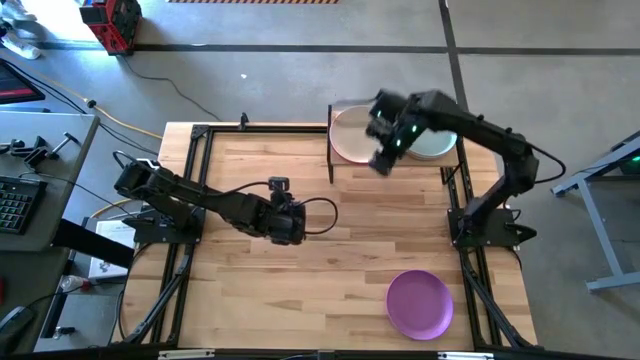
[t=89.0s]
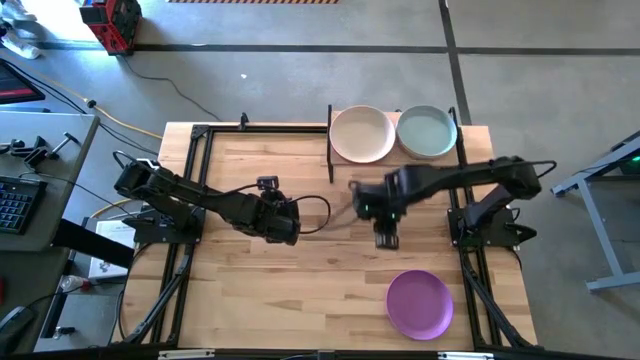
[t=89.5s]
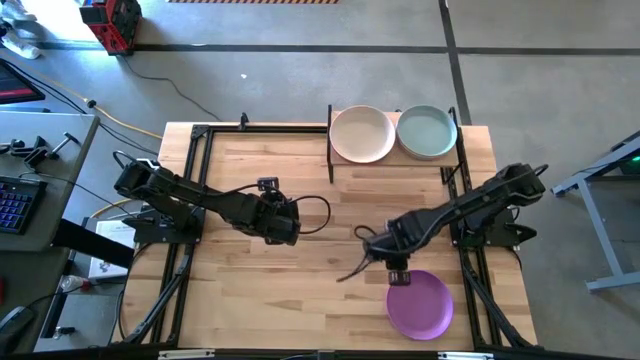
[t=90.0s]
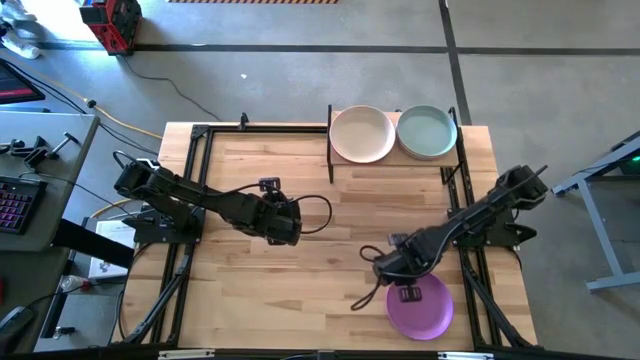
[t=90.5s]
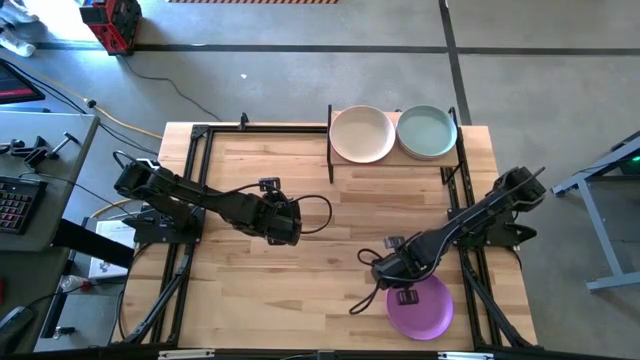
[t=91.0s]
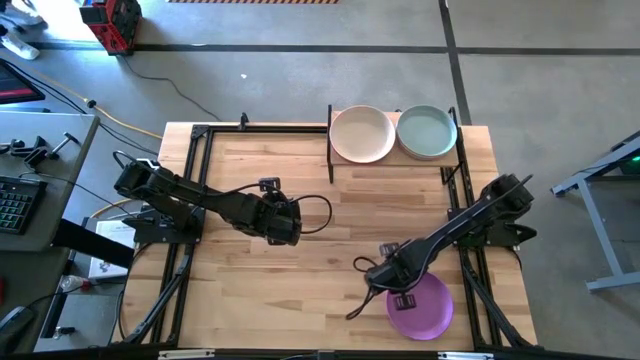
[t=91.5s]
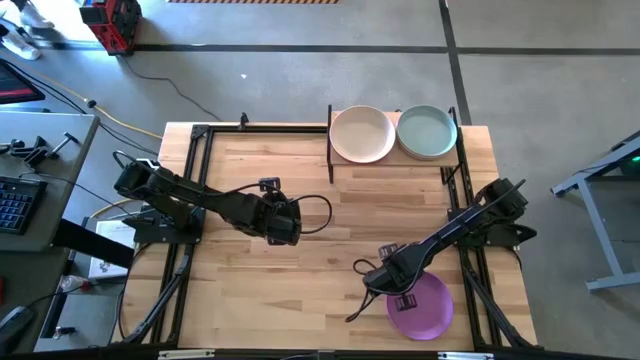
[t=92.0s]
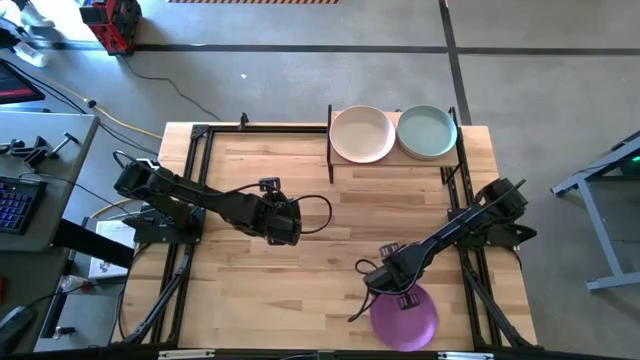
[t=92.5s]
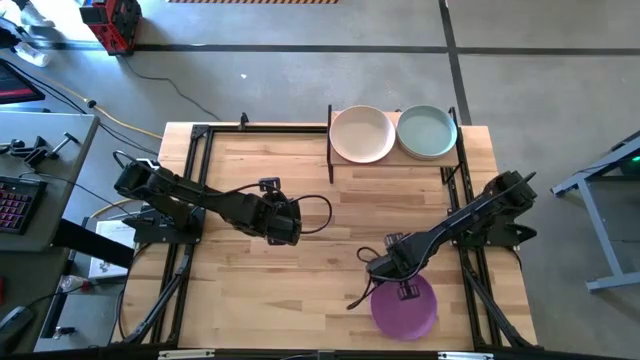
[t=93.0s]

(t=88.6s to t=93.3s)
Task: Place and stack plates onto a shelf
Stack the violet plate into the white plate on the shelf

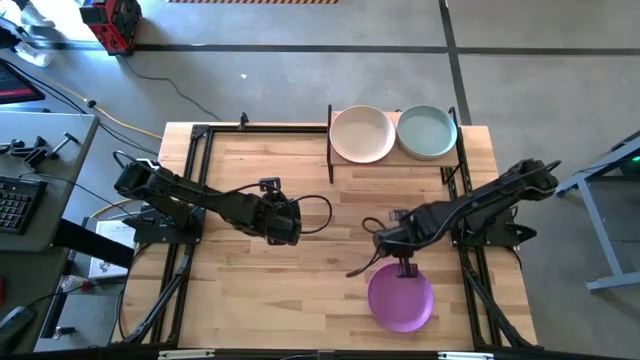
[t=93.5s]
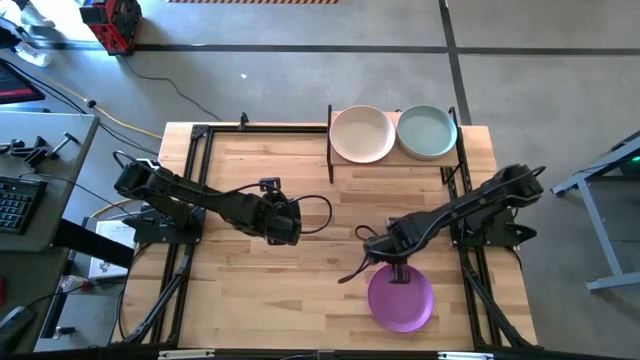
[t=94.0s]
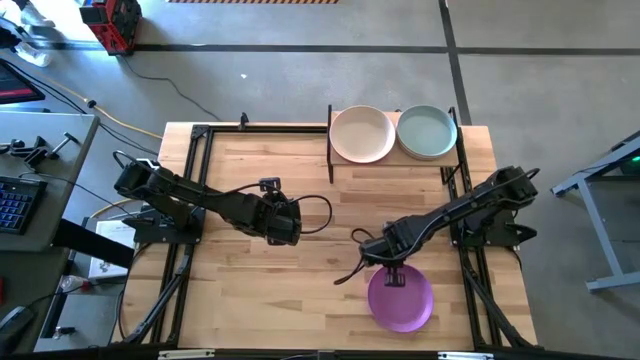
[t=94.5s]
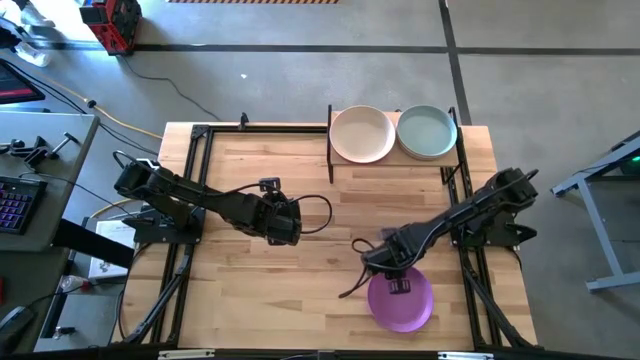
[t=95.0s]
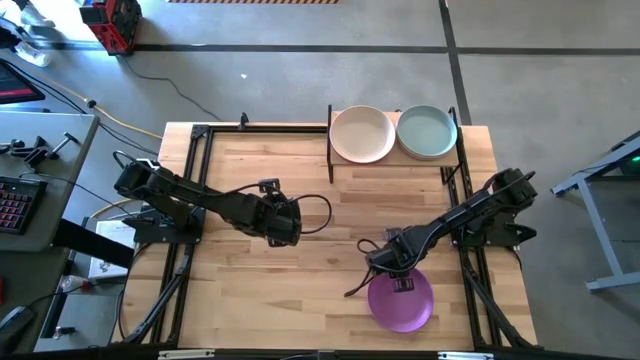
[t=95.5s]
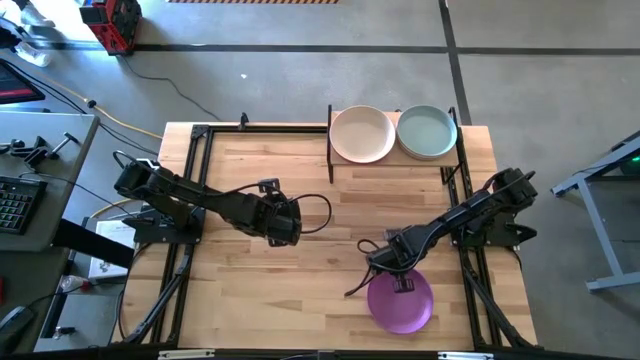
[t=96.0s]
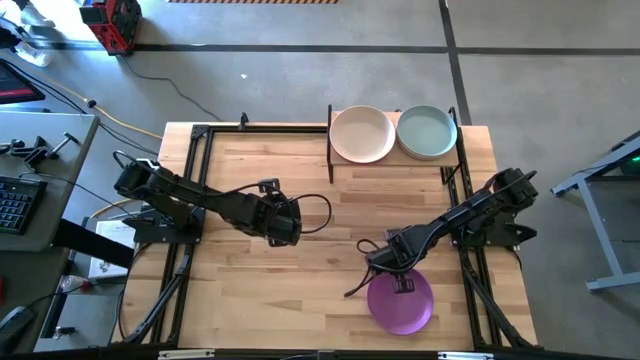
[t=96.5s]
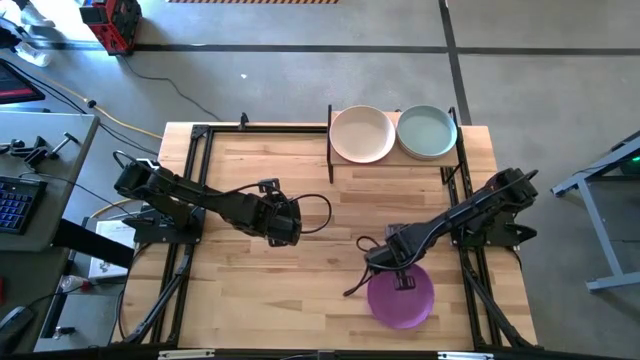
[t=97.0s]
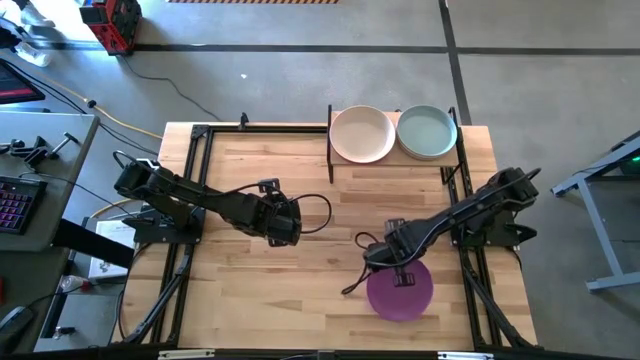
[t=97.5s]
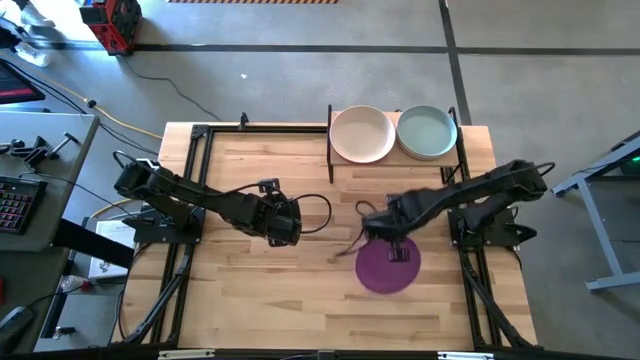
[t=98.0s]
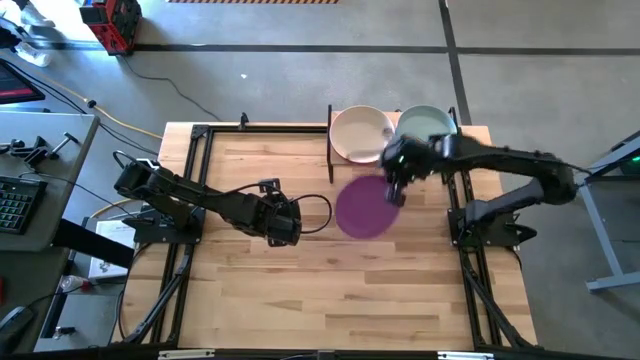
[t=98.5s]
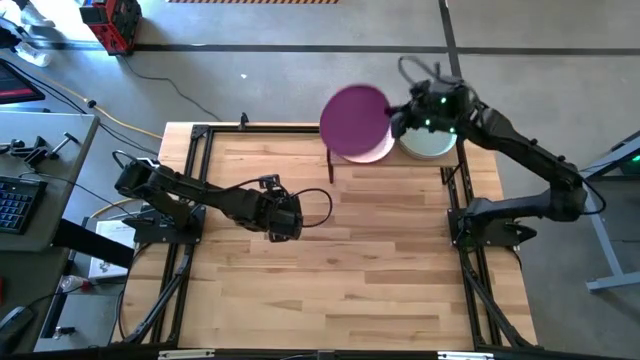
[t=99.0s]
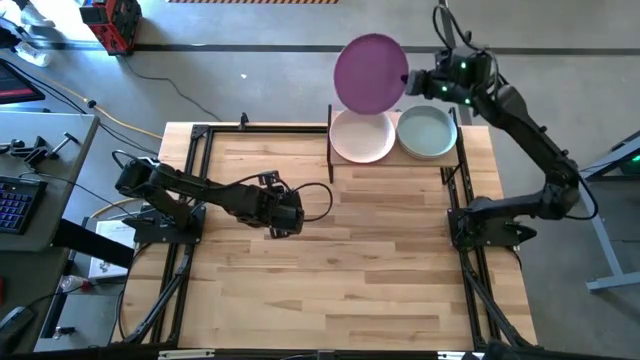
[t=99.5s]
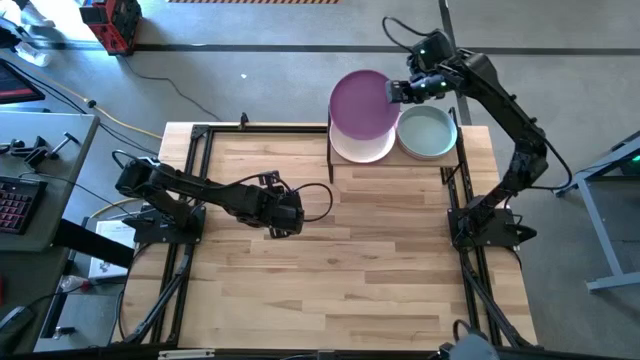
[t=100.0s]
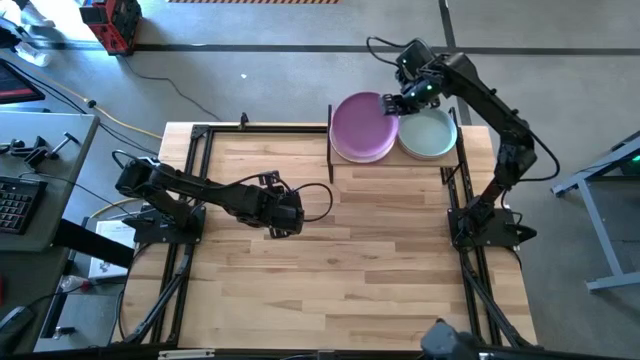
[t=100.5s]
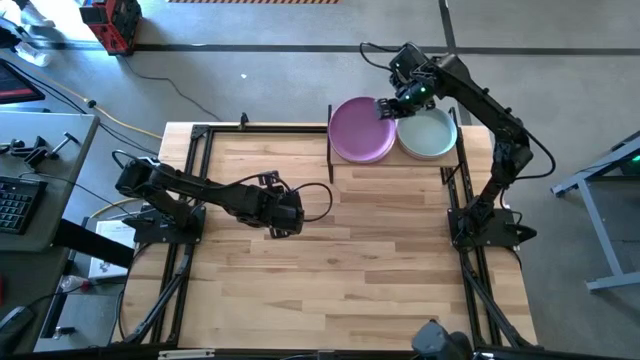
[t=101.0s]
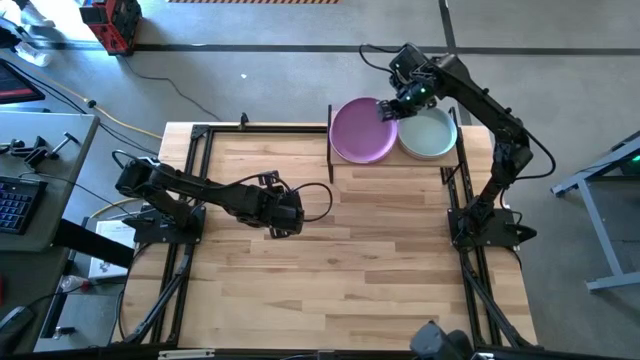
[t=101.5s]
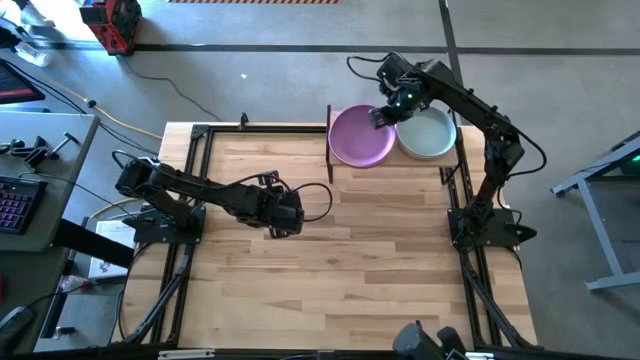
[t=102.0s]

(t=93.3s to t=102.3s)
Stack the violet plate into the white plate on the shelf

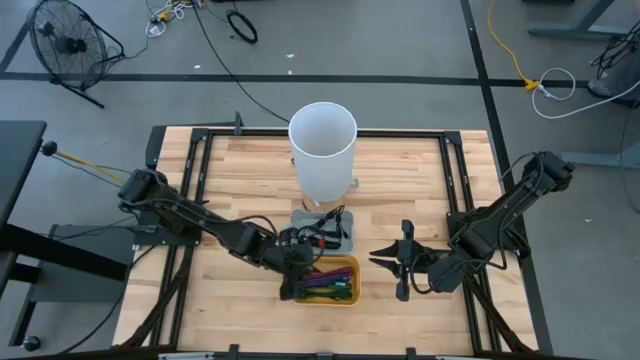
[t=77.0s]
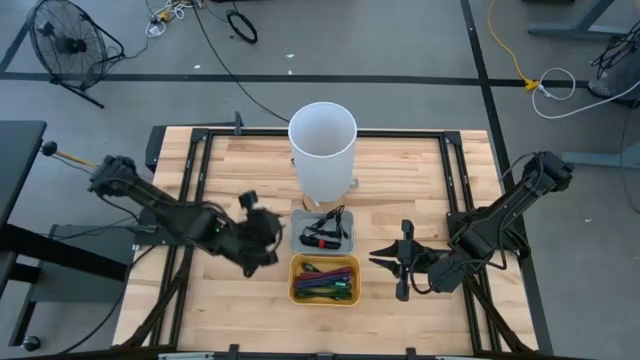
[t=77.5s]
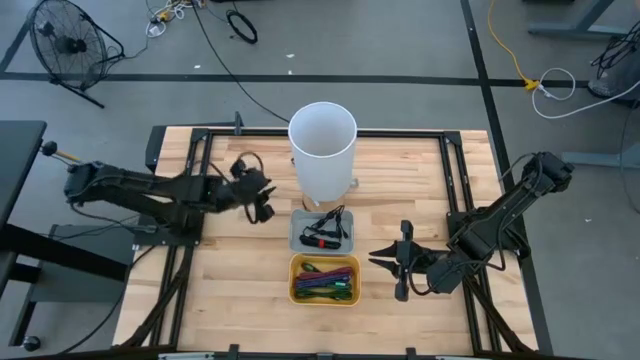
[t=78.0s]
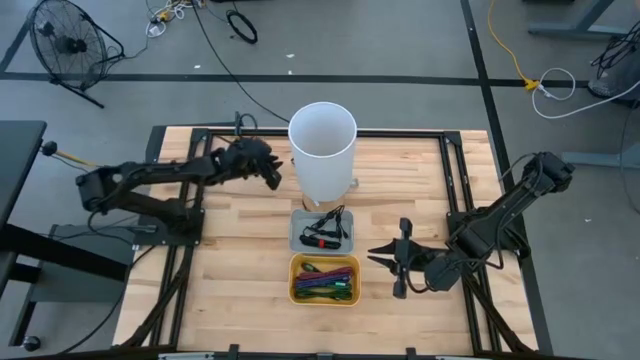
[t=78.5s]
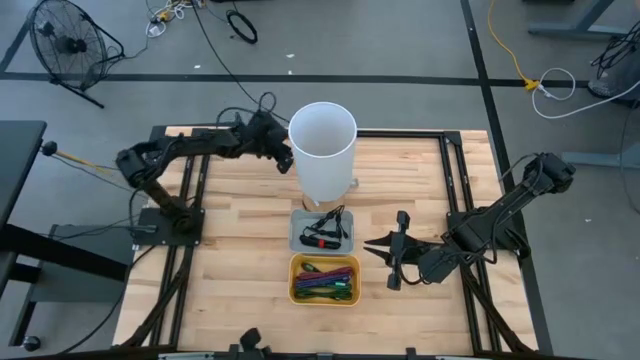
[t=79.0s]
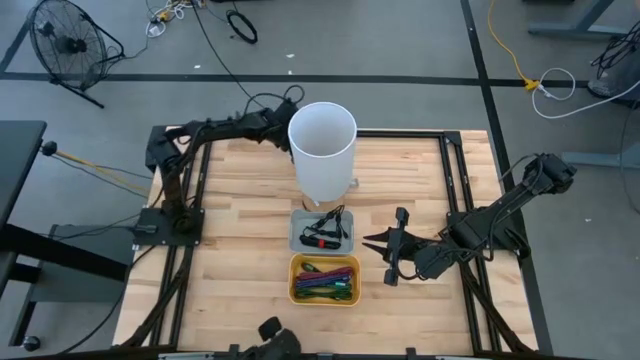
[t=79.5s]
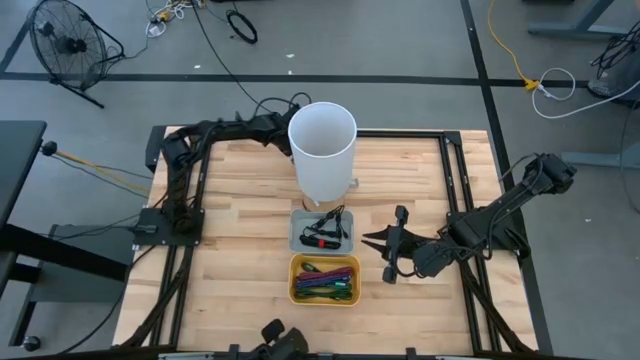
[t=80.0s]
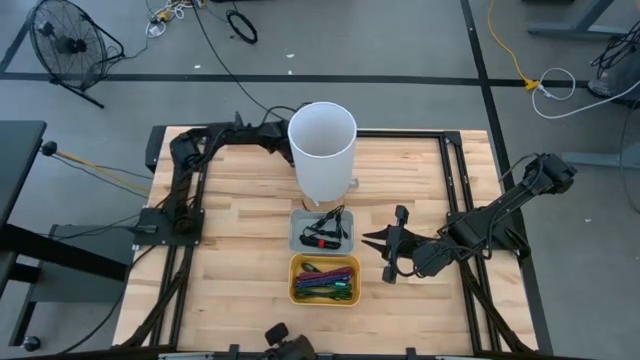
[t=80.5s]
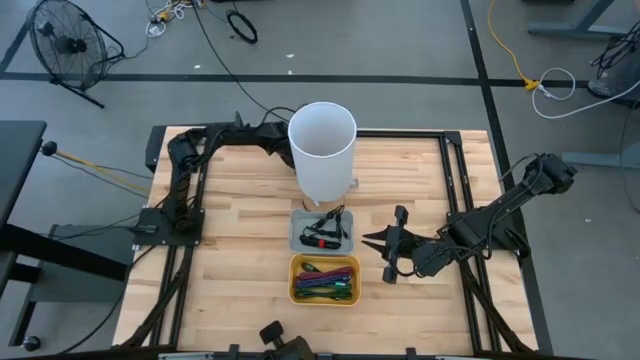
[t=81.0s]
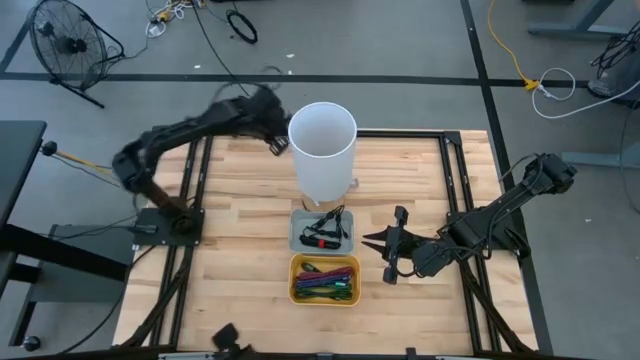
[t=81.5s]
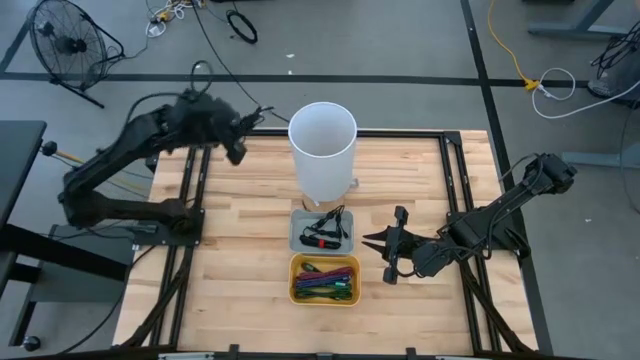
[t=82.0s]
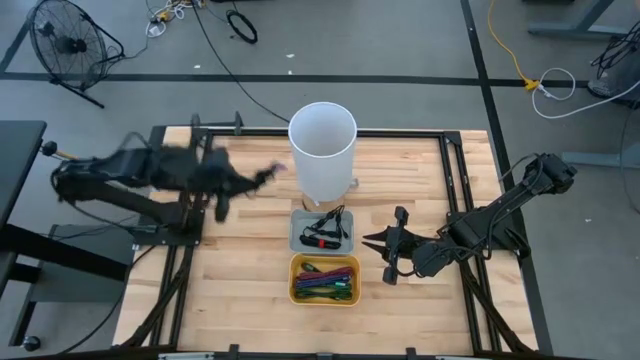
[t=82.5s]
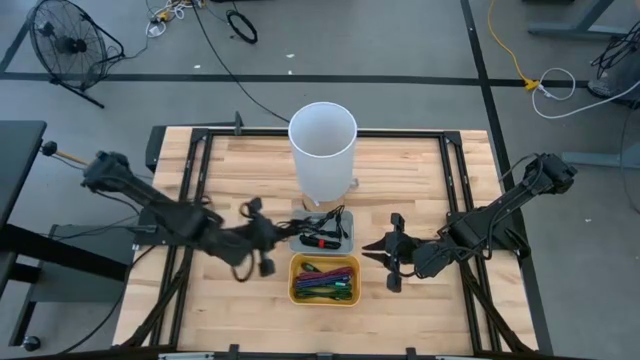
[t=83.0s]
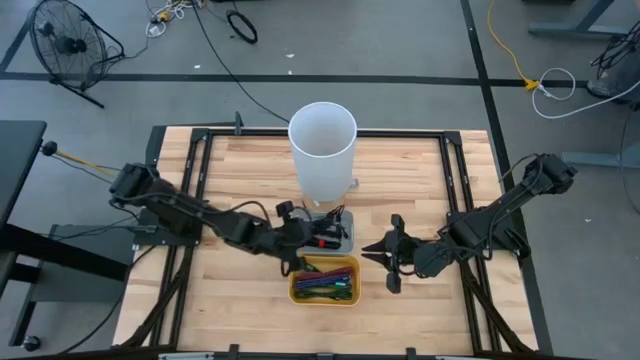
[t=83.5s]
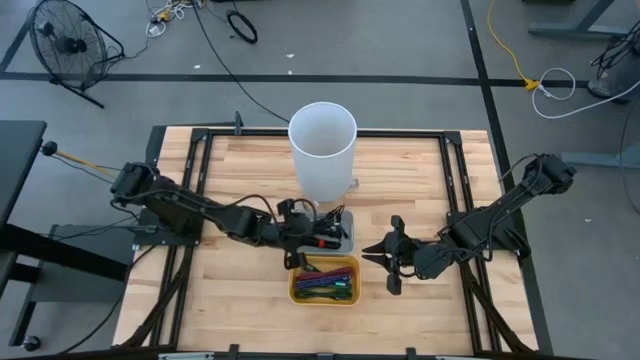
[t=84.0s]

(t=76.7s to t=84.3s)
Task: Pick & Place USB Port
Put the black charger cable into the gray bin
